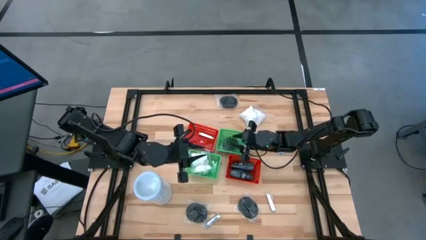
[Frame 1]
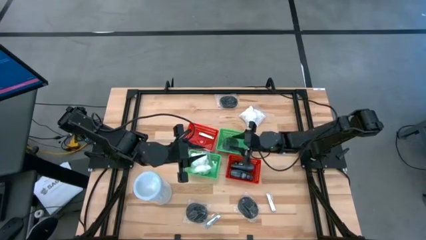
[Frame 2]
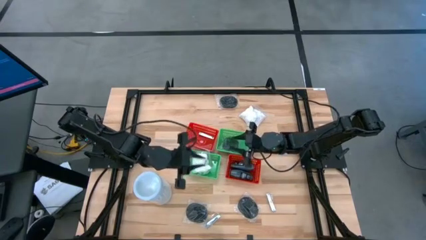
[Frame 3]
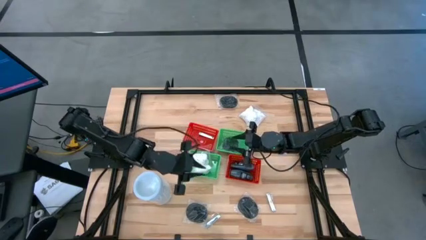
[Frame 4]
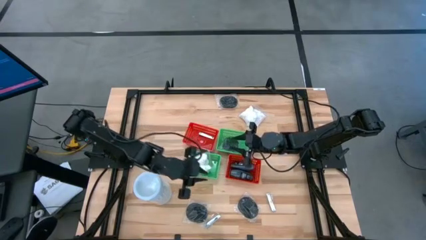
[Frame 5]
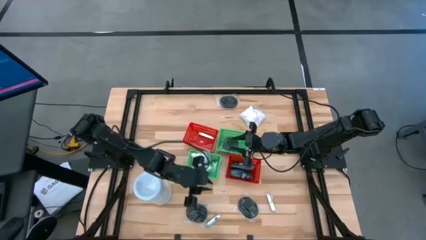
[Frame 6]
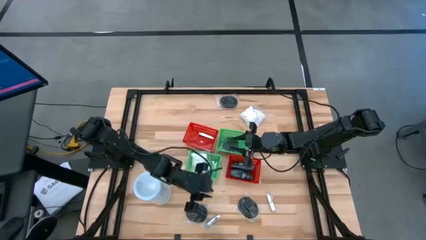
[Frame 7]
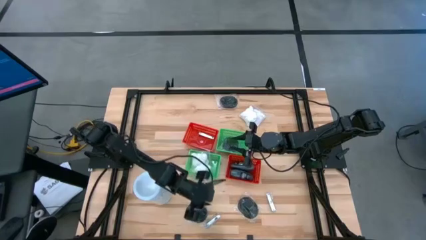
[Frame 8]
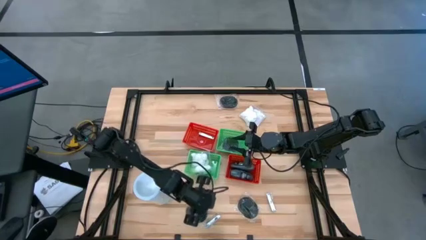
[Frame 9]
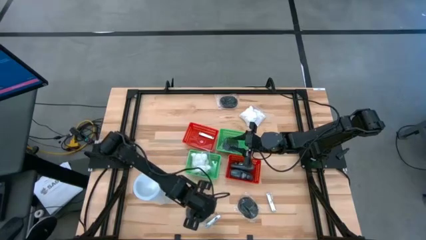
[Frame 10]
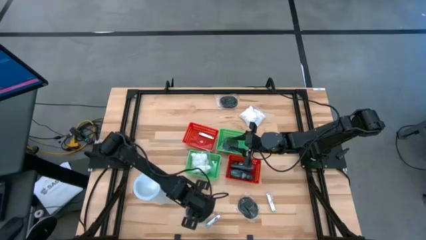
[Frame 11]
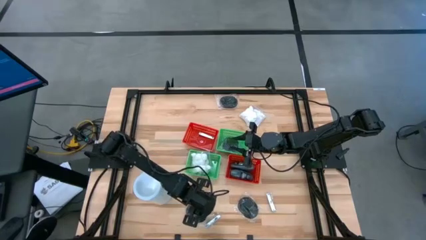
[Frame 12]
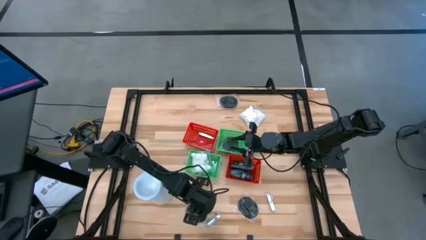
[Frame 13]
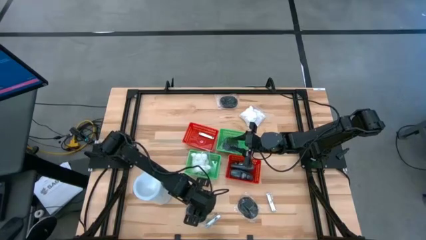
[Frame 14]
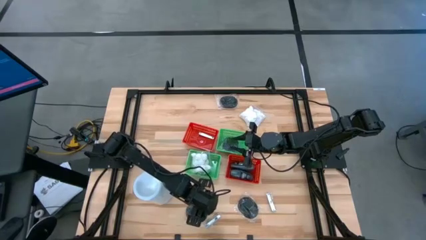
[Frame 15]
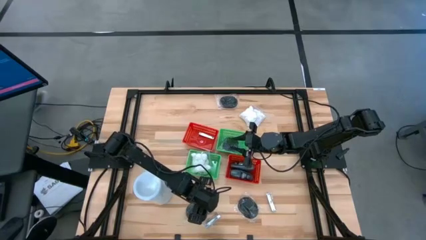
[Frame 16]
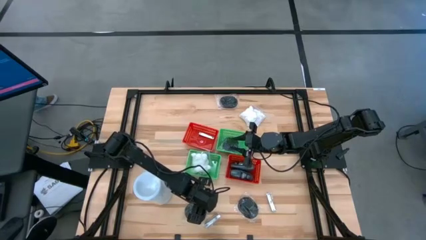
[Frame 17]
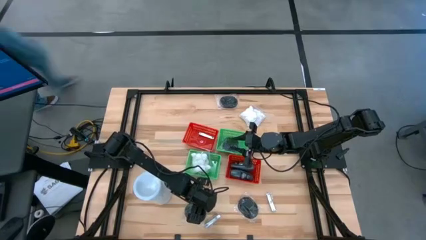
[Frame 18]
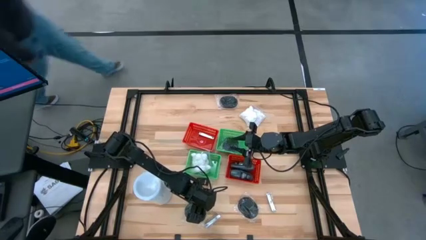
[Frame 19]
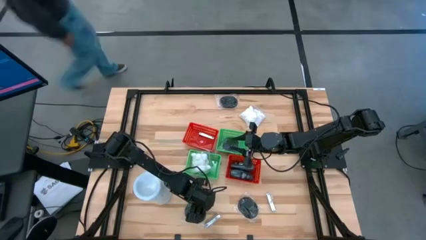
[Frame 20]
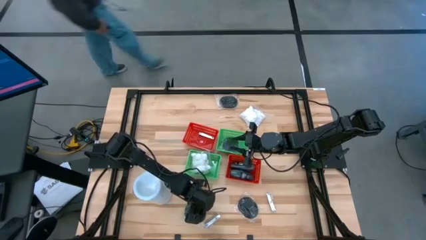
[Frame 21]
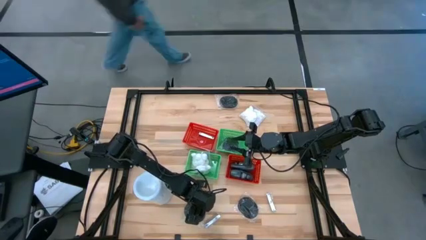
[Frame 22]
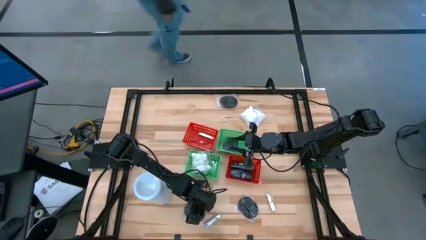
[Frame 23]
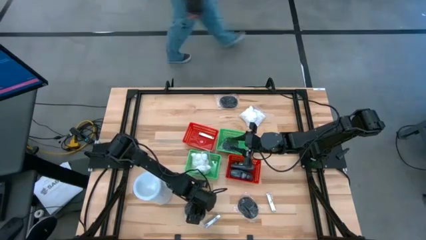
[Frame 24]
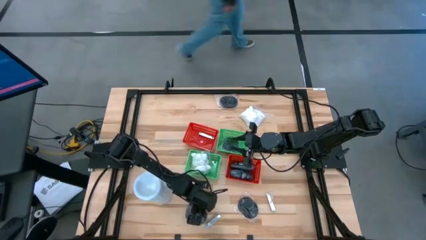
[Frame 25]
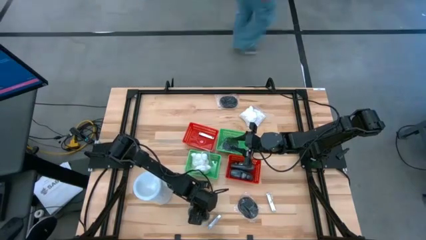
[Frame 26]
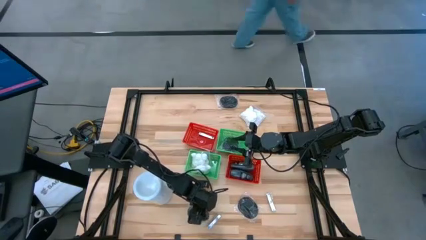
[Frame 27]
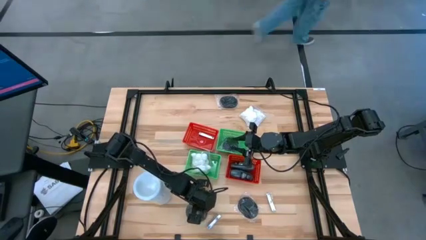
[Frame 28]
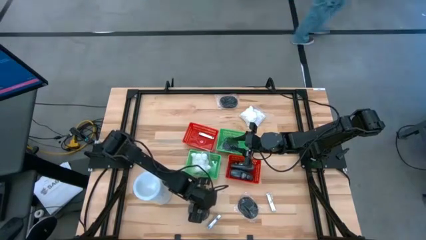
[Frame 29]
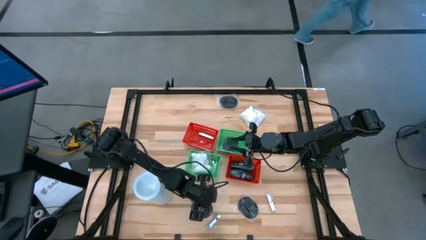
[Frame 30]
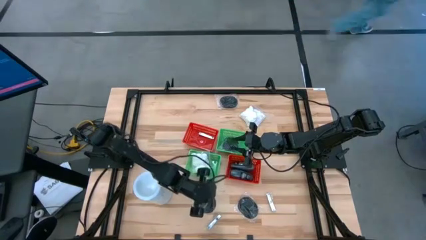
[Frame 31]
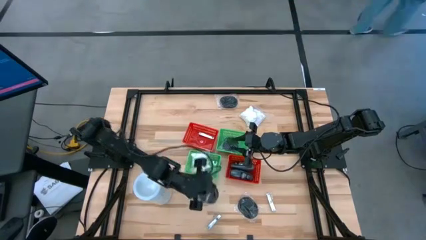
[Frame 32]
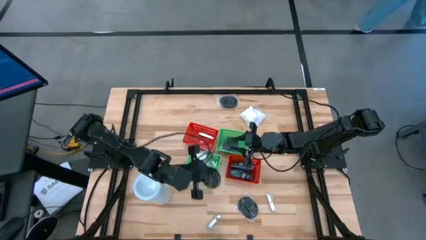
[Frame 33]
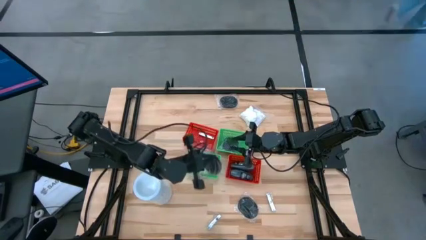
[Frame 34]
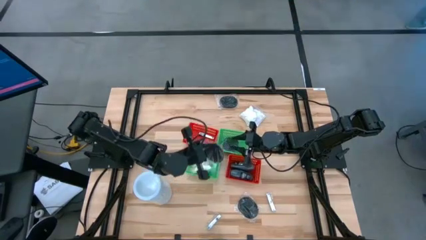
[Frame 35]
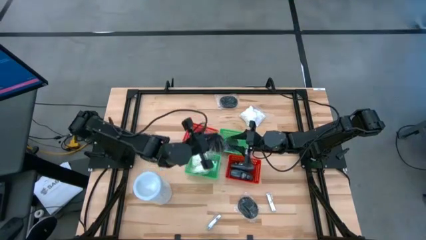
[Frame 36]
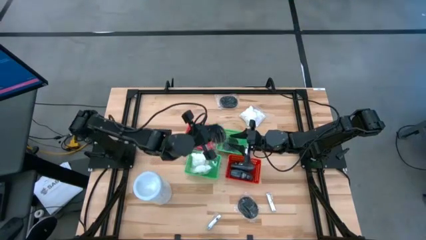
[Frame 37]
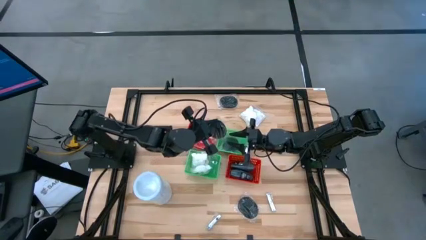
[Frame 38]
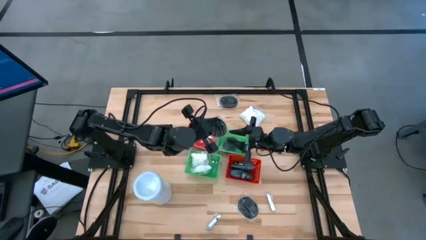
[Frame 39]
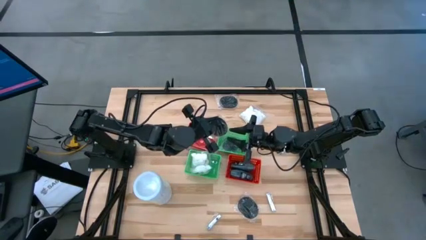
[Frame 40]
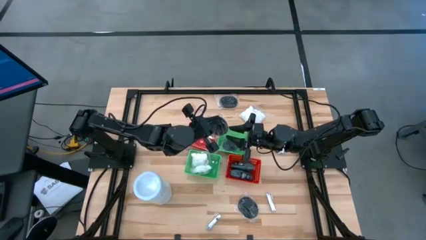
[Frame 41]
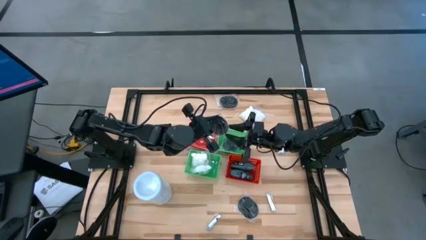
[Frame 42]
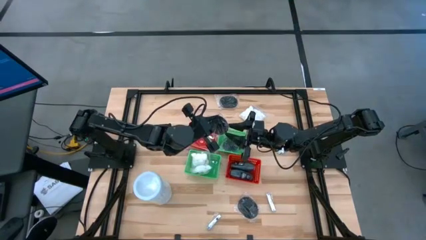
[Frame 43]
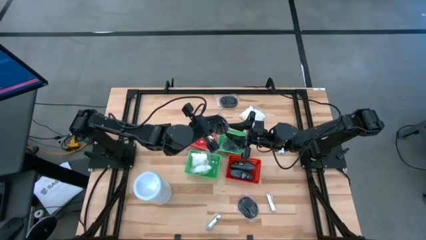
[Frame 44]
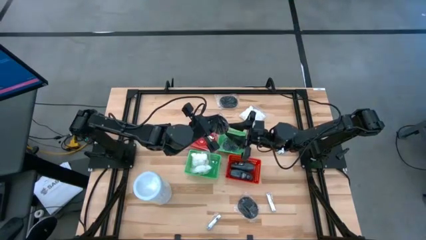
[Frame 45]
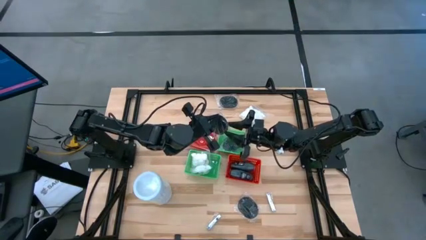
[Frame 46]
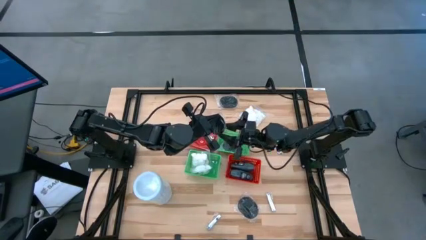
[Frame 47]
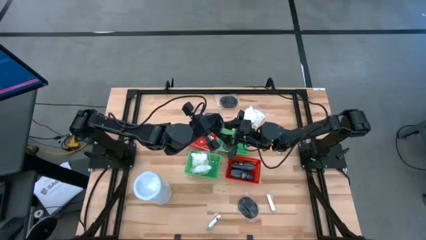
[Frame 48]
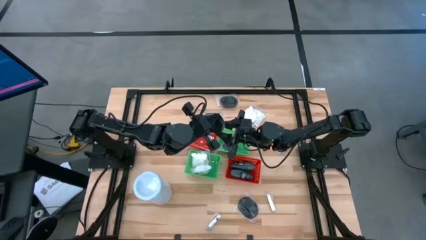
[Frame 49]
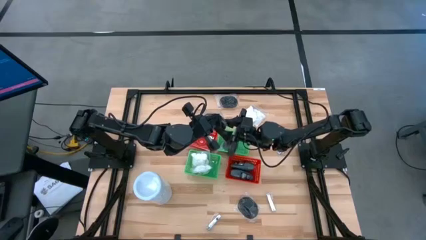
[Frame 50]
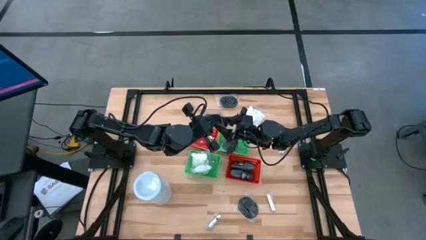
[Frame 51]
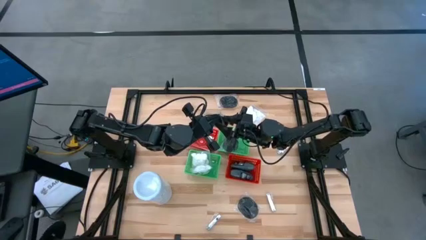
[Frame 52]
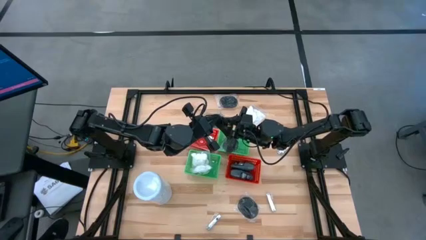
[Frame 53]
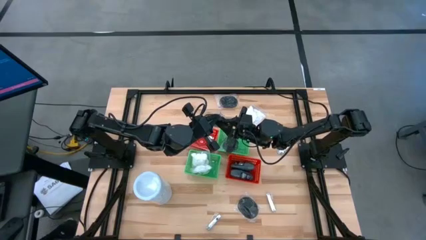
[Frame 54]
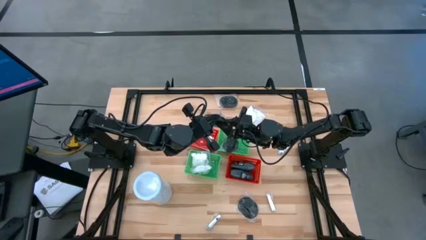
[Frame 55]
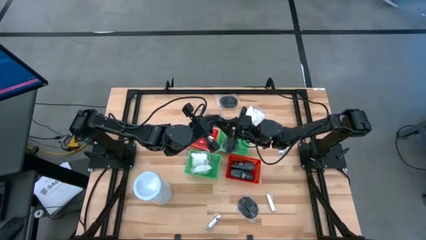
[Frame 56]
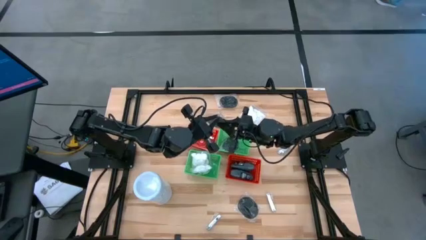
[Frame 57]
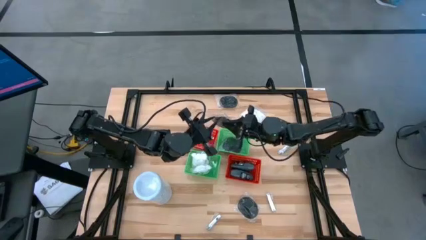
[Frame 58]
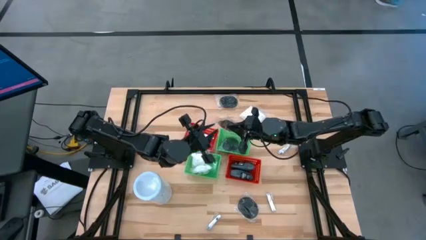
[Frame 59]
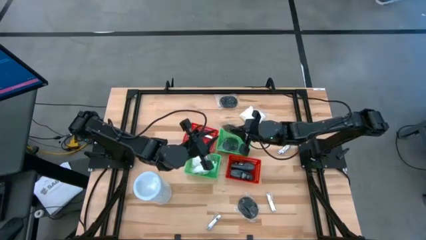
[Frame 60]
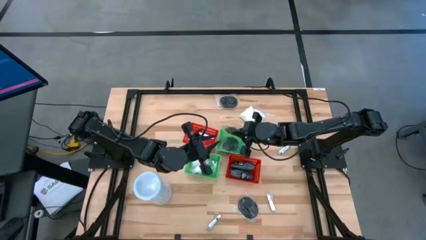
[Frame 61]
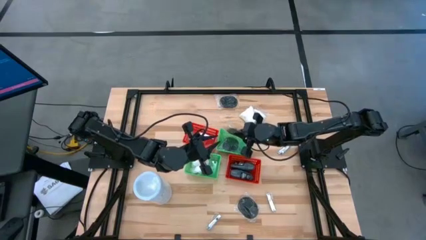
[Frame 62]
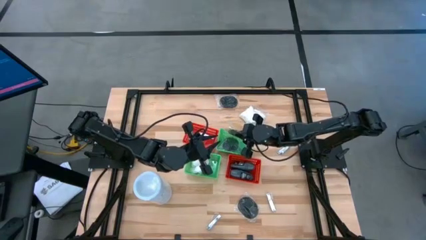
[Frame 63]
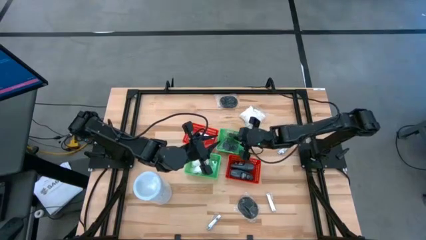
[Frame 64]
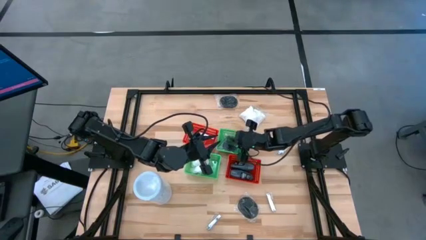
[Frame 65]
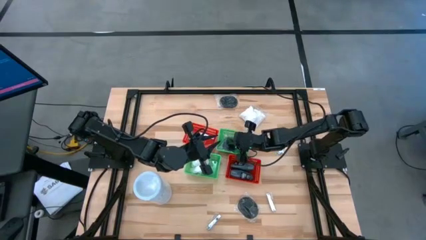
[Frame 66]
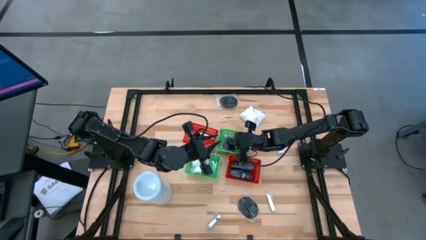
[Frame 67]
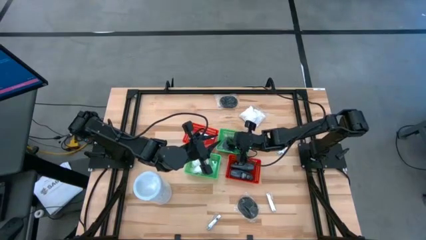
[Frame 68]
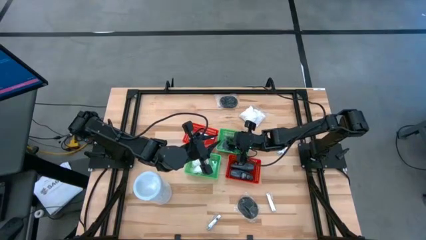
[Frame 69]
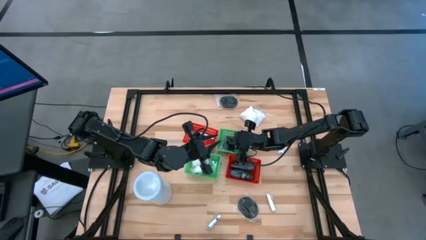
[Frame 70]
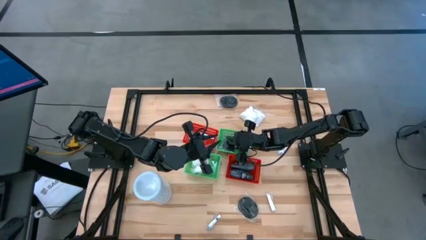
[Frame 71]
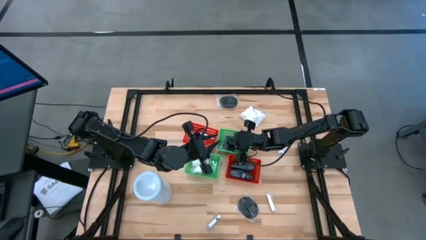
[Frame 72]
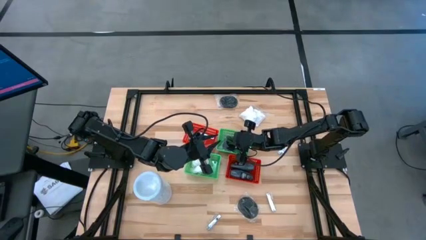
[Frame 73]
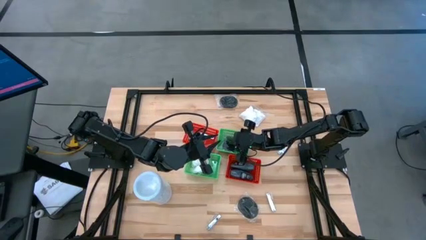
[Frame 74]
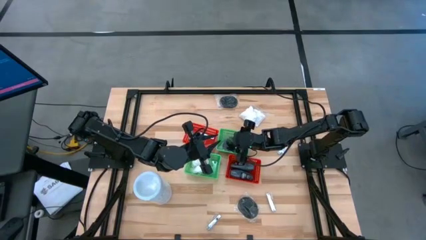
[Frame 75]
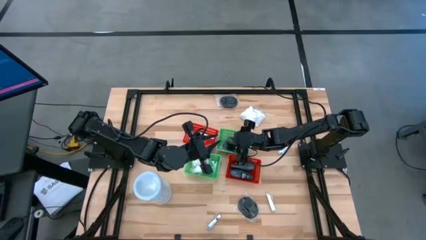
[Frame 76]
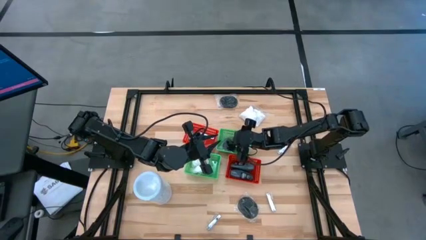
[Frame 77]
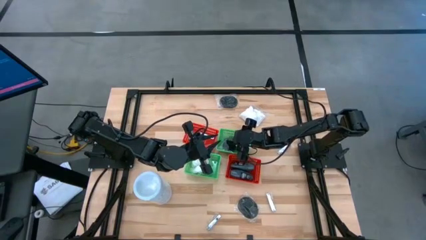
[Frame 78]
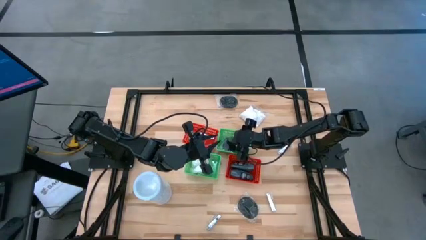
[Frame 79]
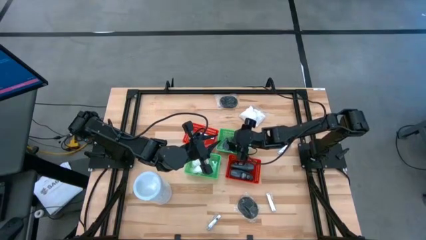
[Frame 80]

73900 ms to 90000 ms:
Task: Pick & Place Travel size toiletries
Put the black hairbrush into the top right green bin
